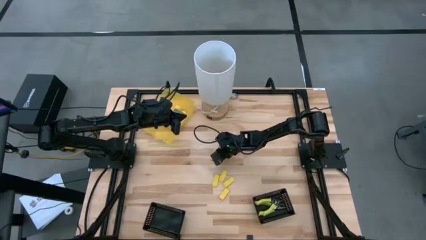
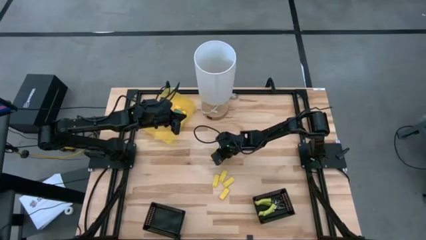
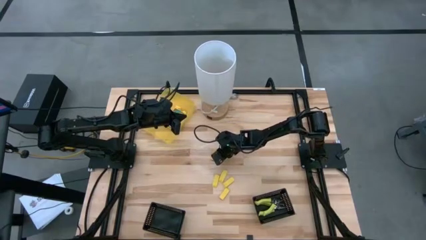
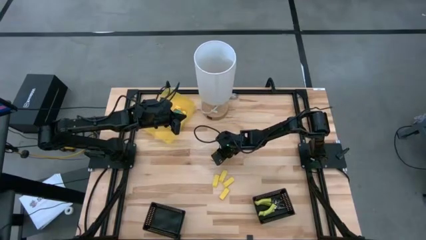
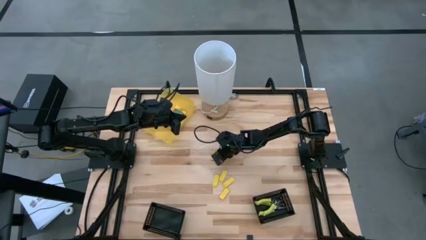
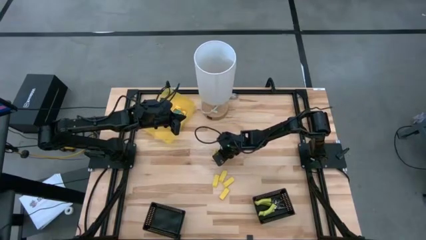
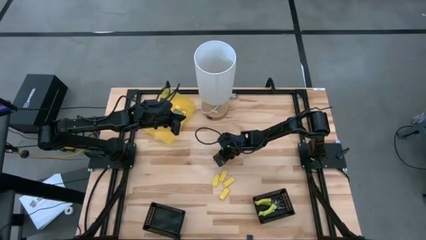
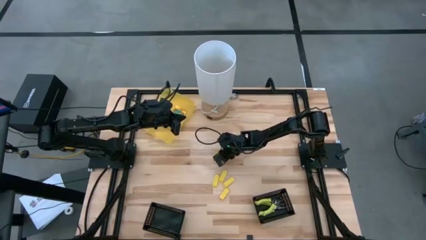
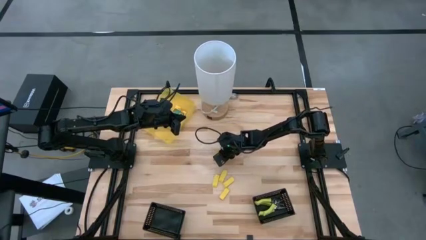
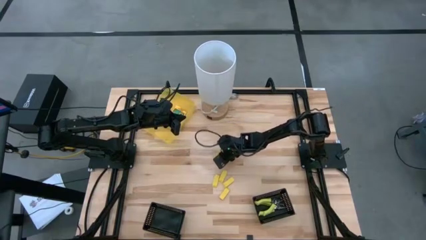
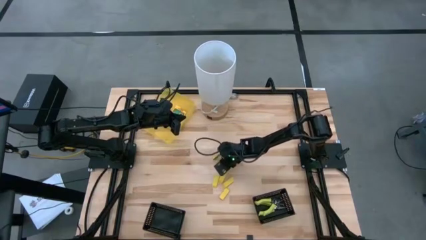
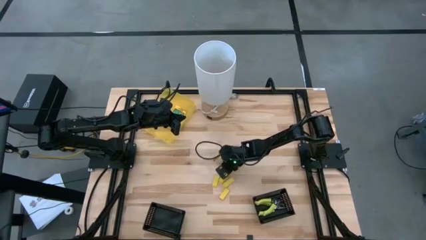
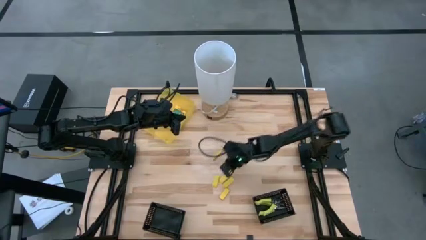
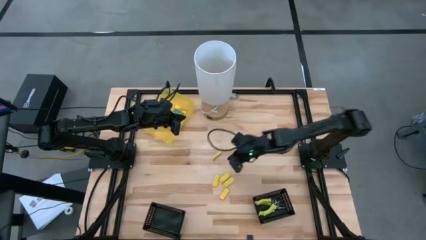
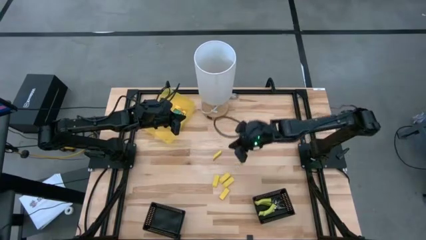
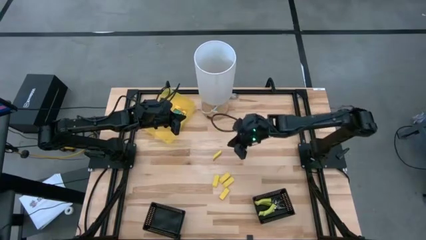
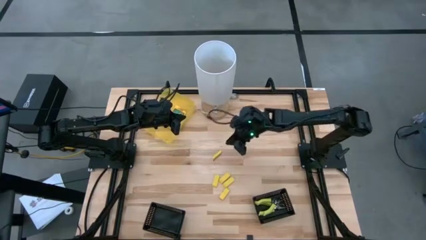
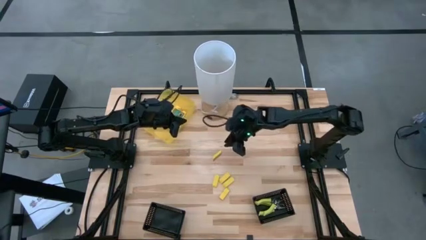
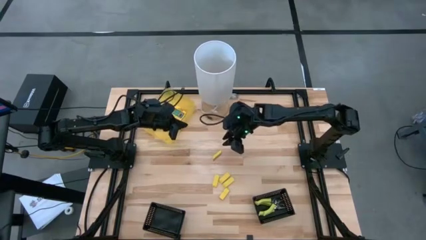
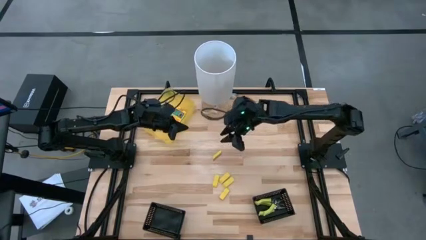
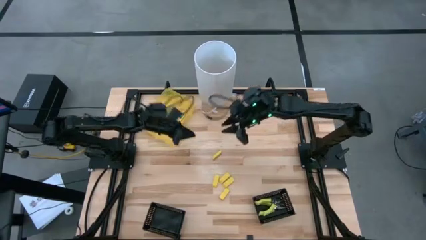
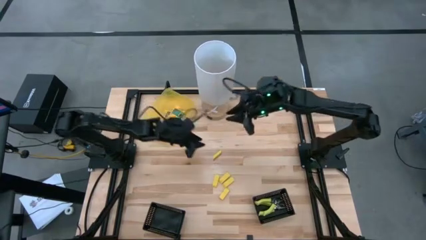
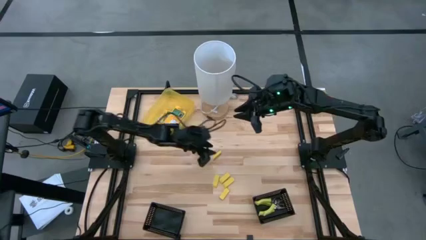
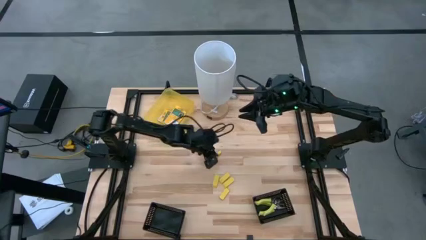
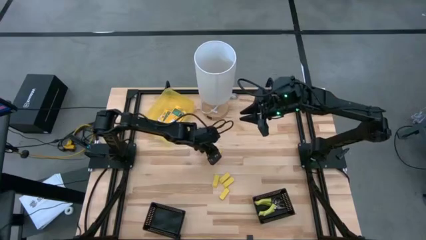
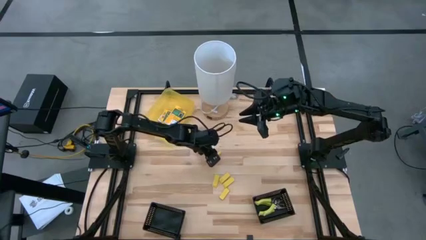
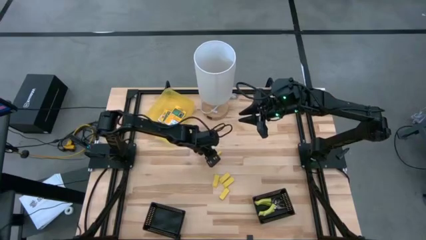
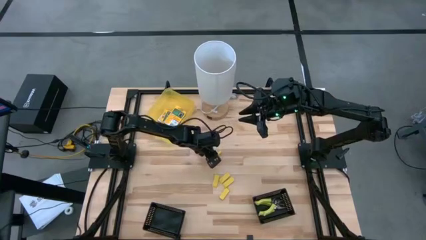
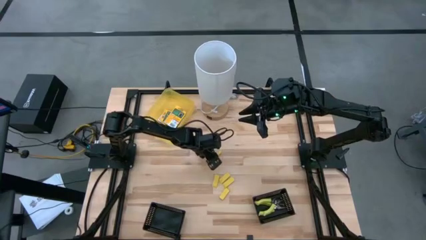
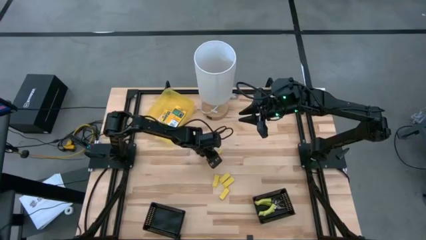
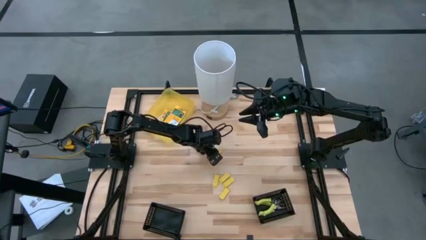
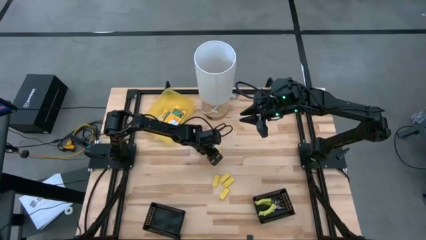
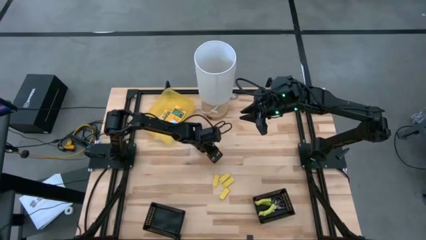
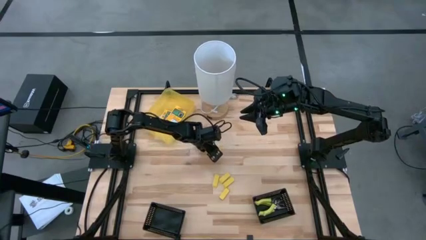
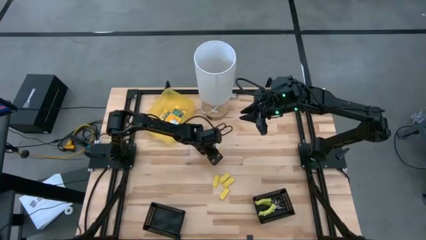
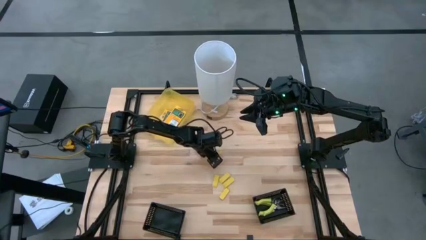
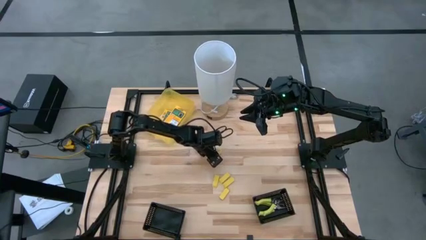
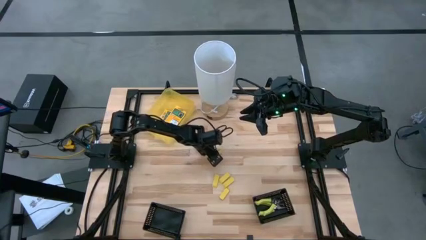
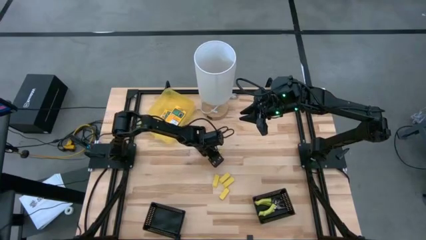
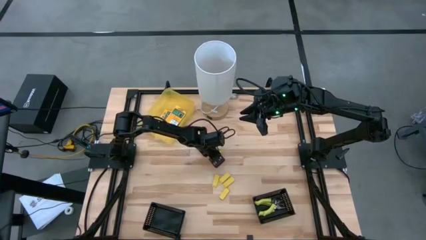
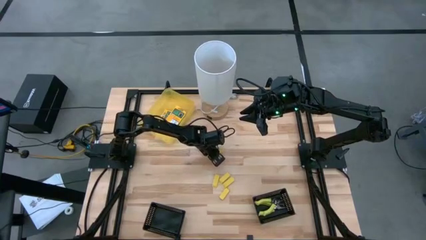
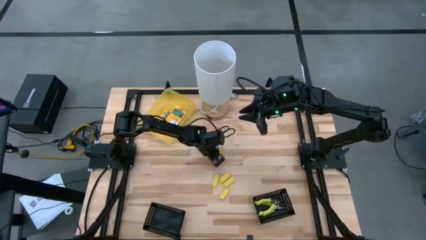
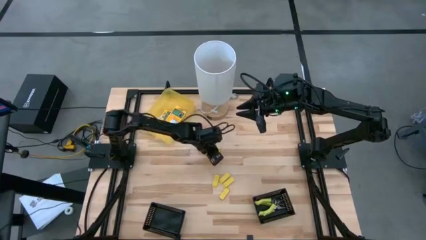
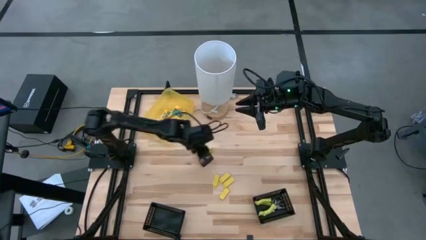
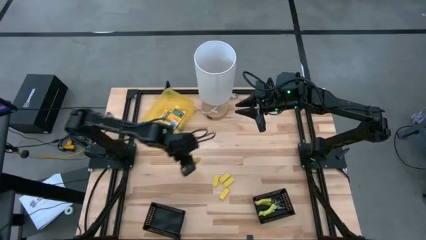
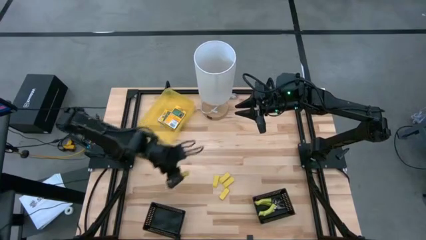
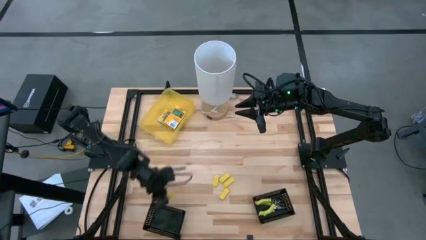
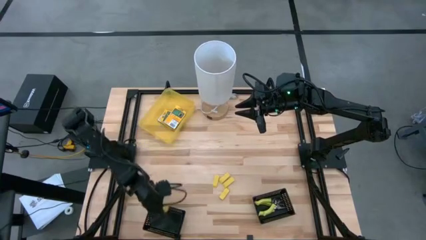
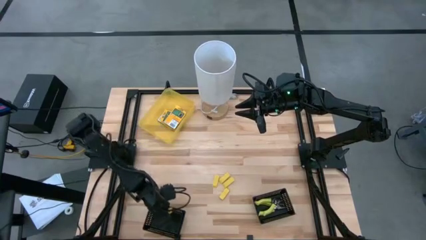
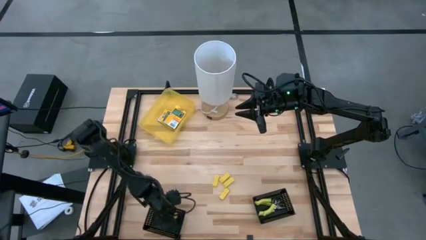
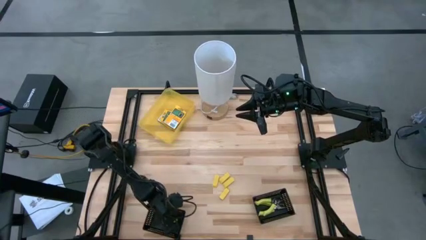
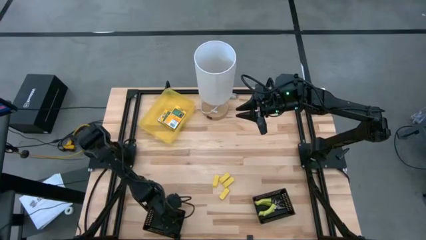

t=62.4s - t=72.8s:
Task: Pick & Place School Supplies
Put the eraser into the bottom left black bin

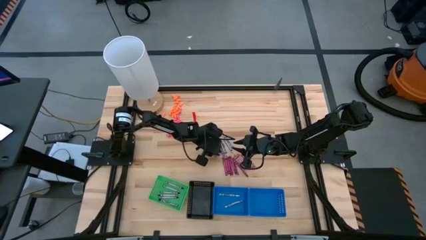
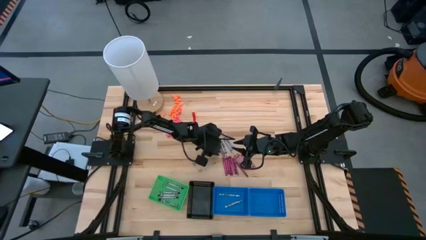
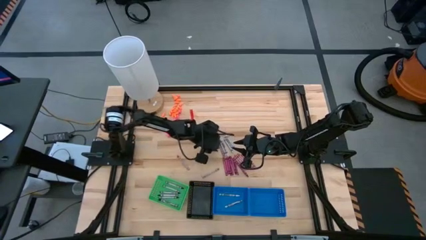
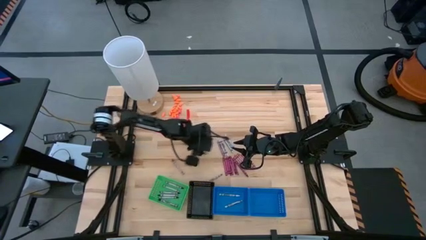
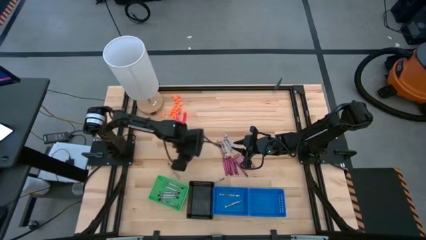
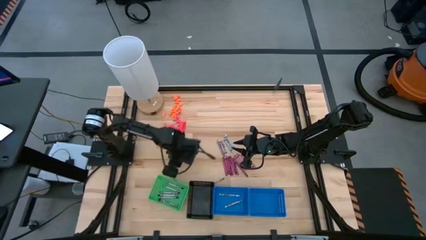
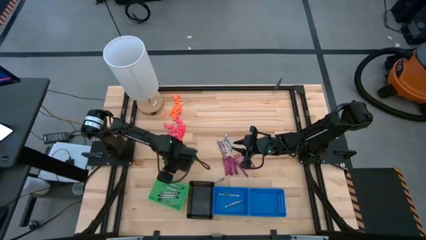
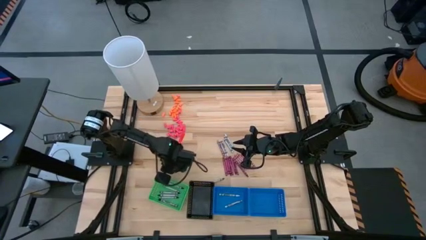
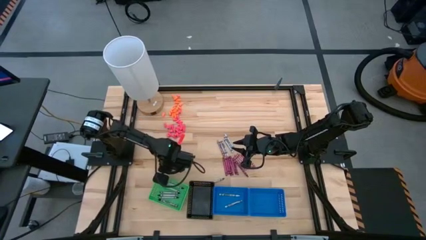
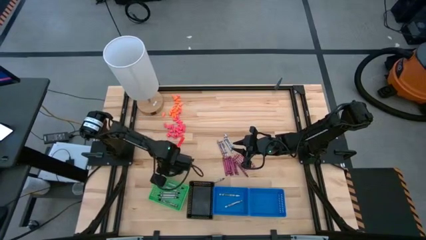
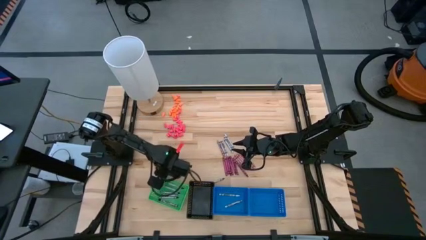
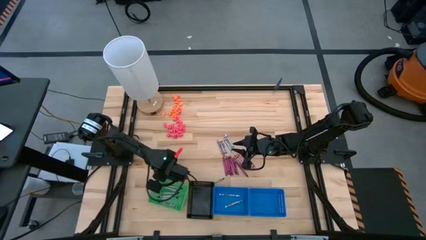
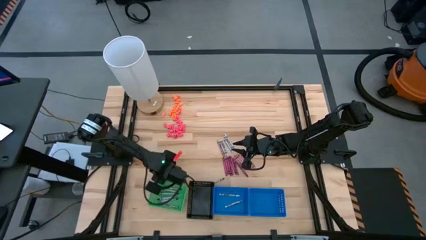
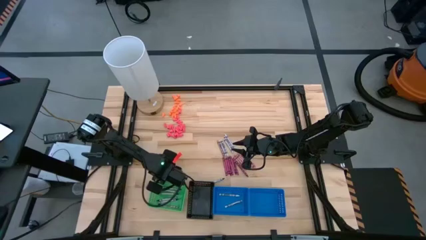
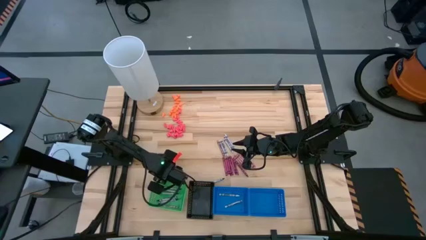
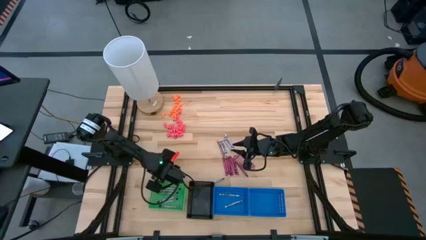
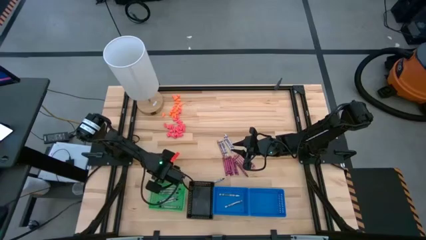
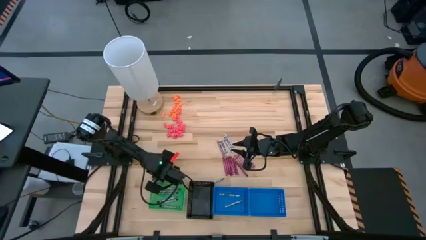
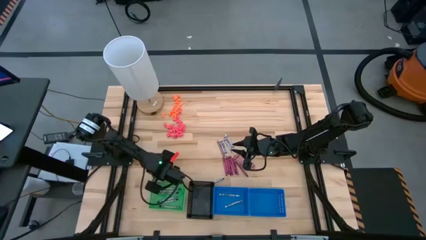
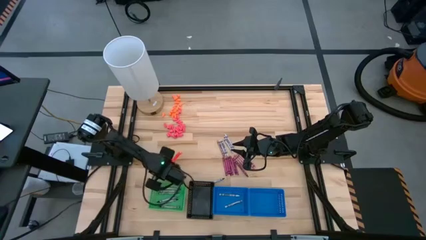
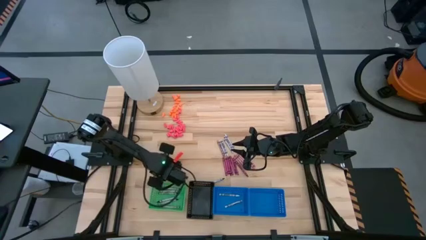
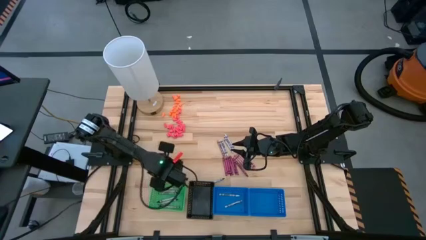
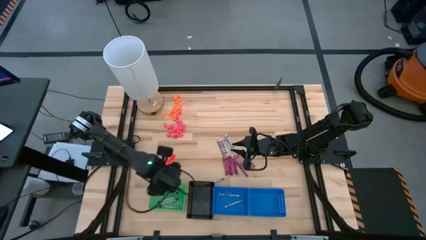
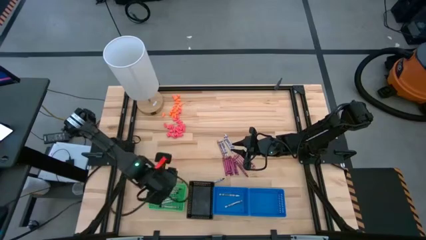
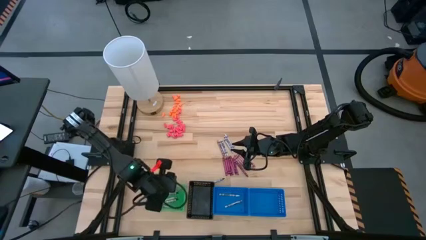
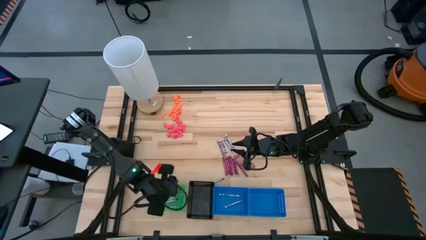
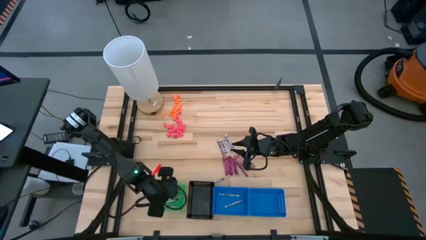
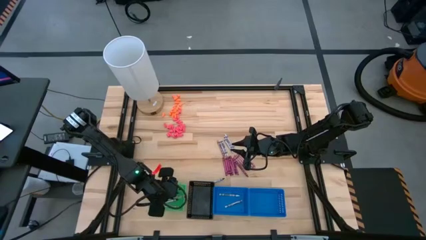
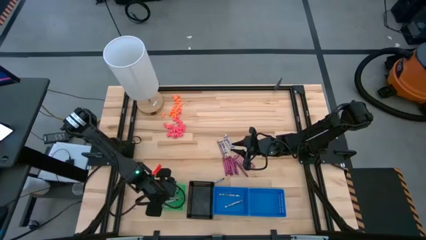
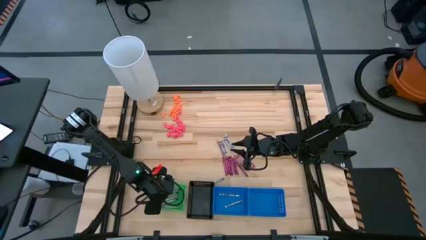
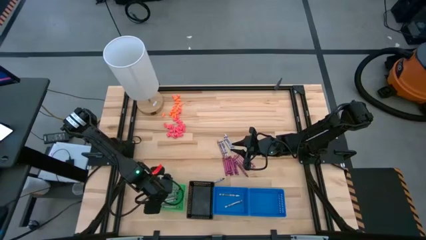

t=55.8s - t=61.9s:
Task: Sort crayons
Put the black crayon into the green bin

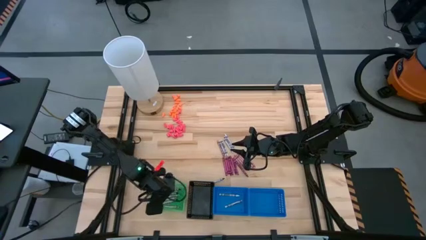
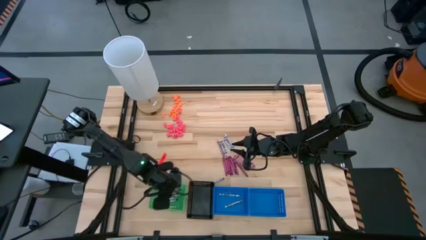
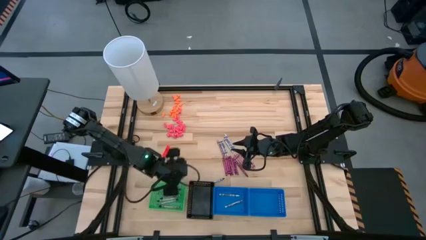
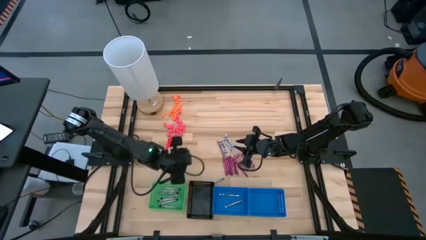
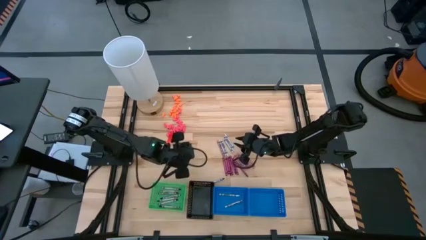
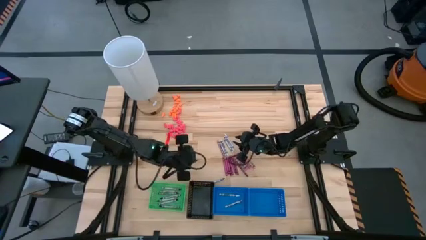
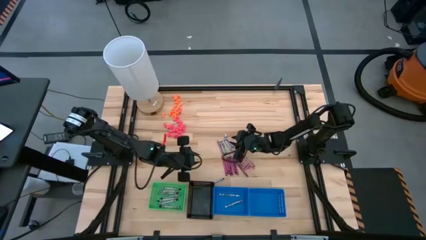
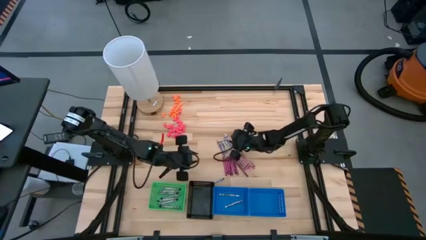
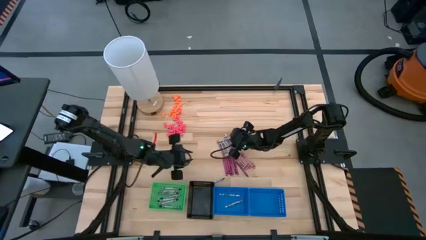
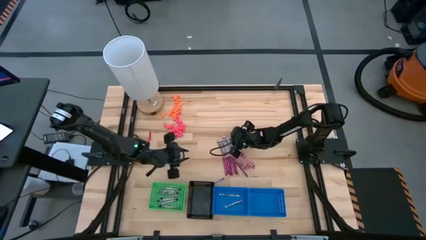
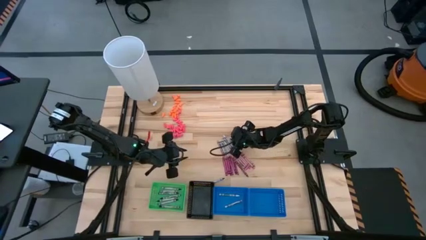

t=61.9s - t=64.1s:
Put the white crayon into the left blue bin
